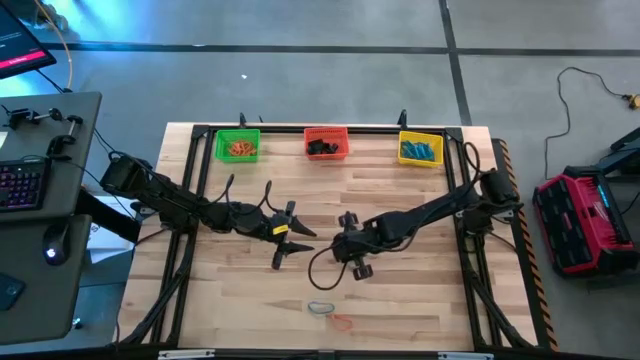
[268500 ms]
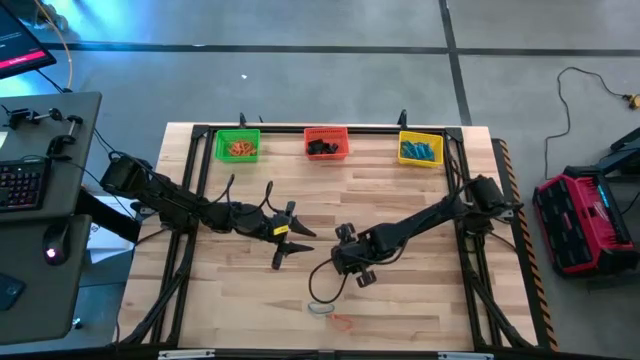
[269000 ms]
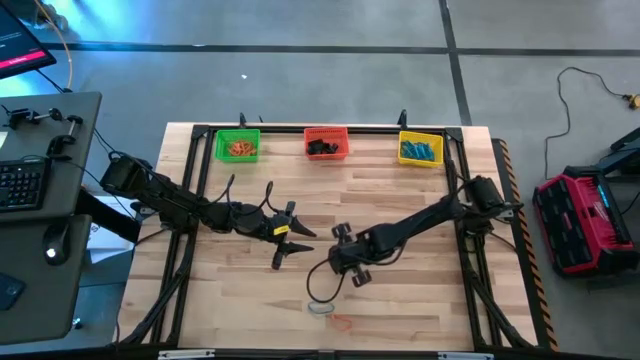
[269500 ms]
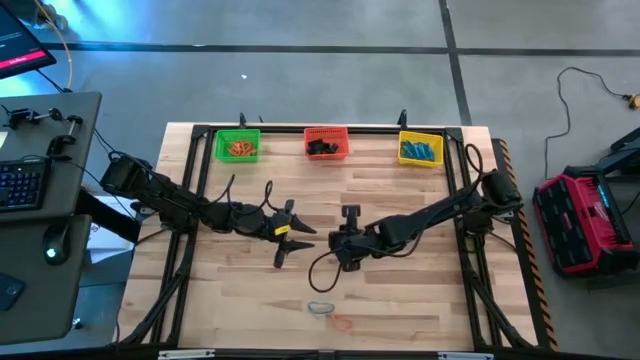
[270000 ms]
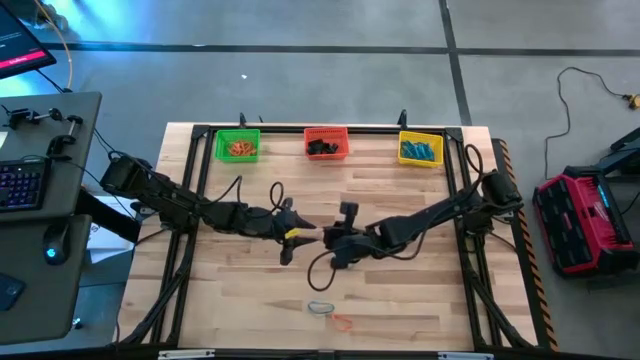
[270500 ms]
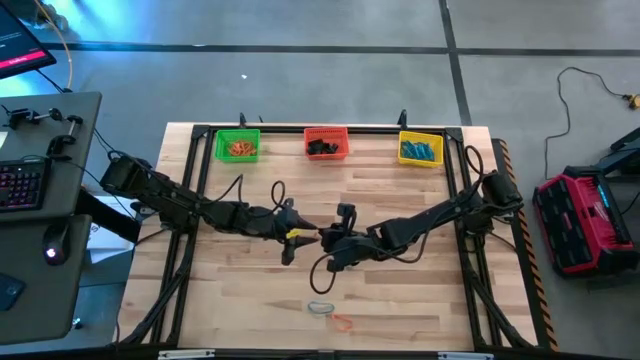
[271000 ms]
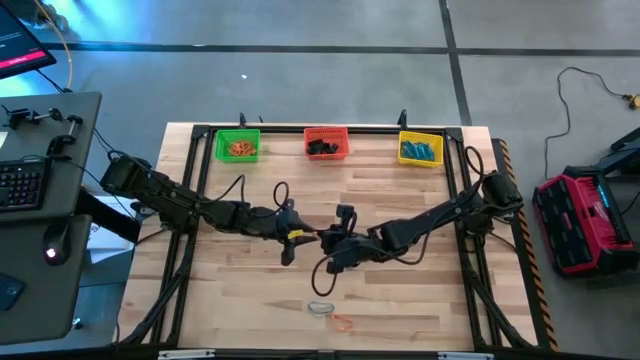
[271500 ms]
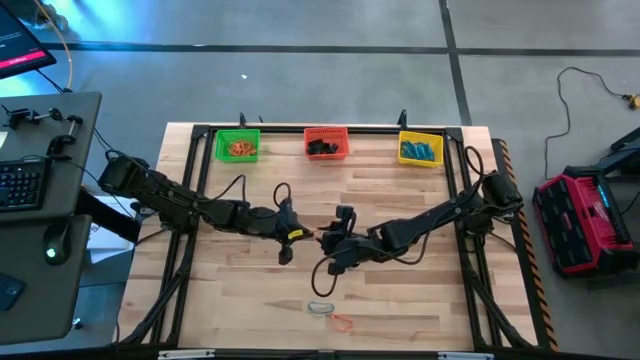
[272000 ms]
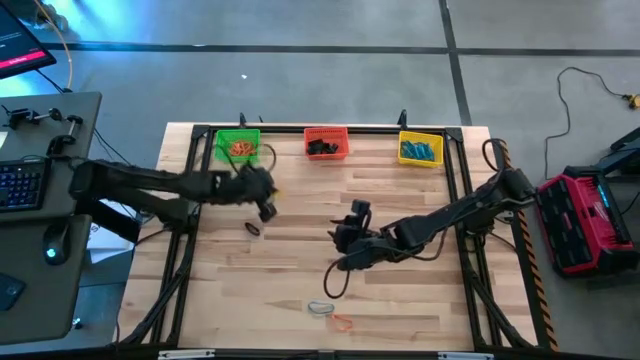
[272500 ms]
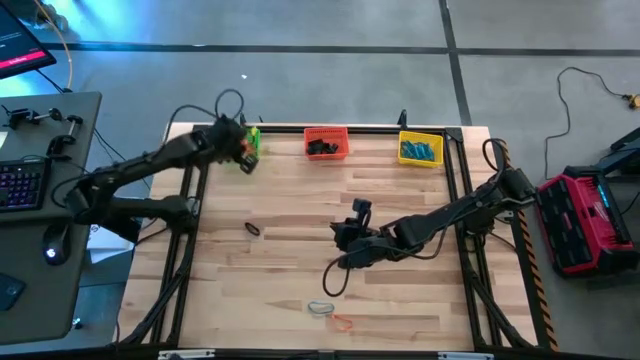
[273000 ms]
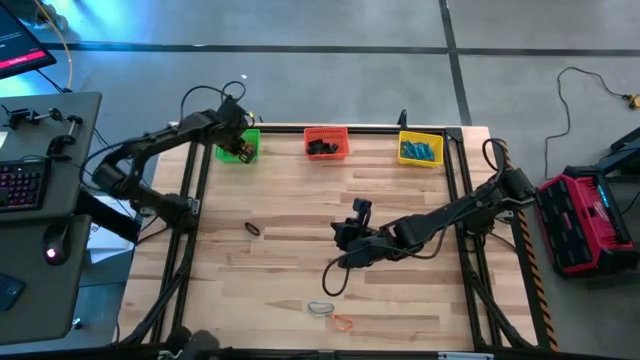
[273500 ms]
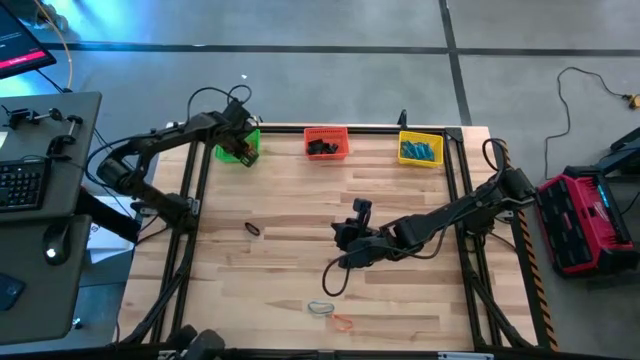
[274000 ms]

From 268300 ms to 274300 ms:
Task: Sort rubber bands into baskets
Put the orange rubber band into the green bin

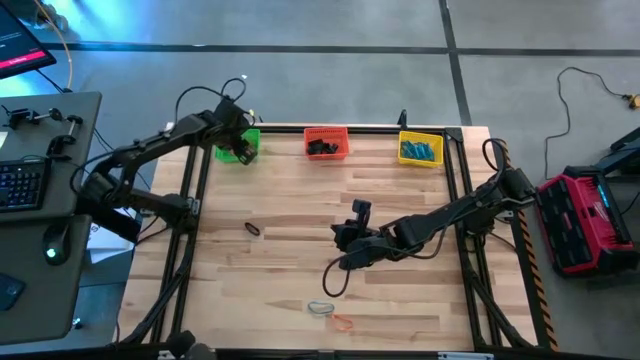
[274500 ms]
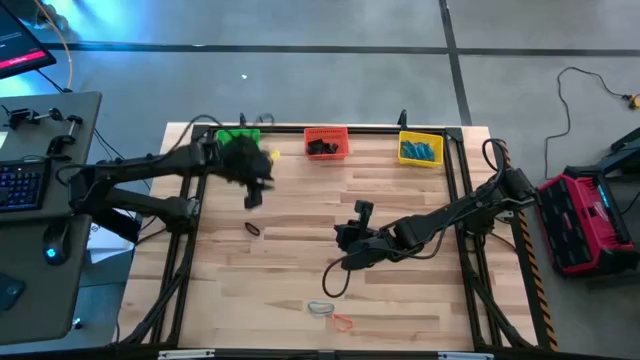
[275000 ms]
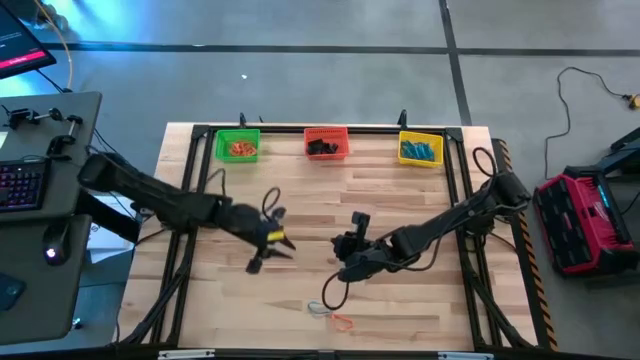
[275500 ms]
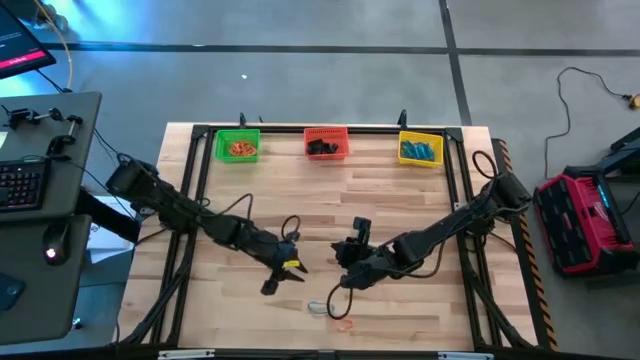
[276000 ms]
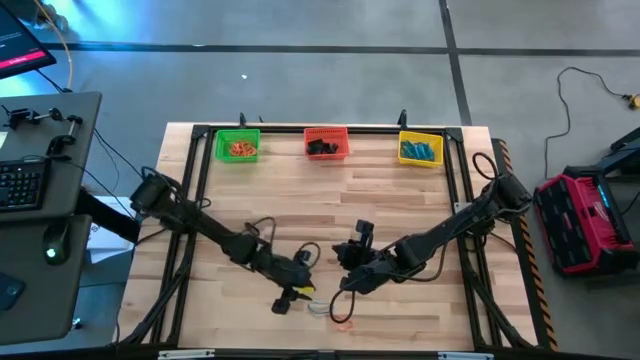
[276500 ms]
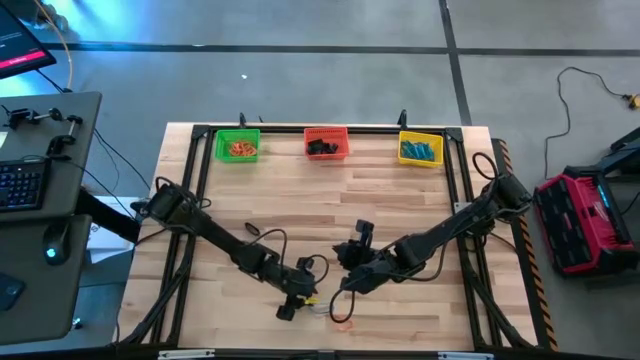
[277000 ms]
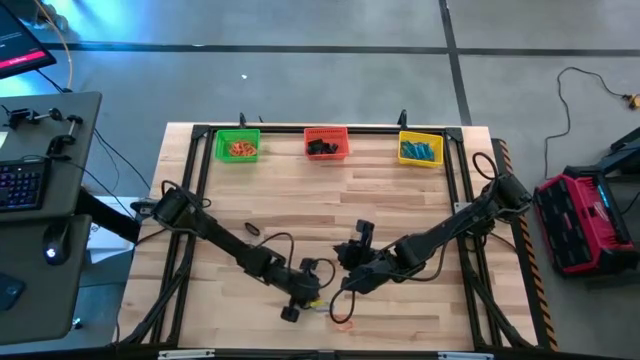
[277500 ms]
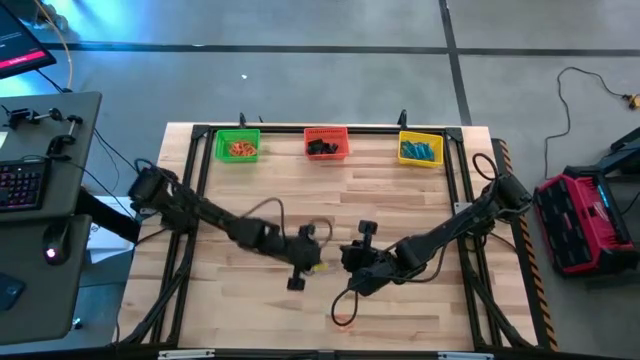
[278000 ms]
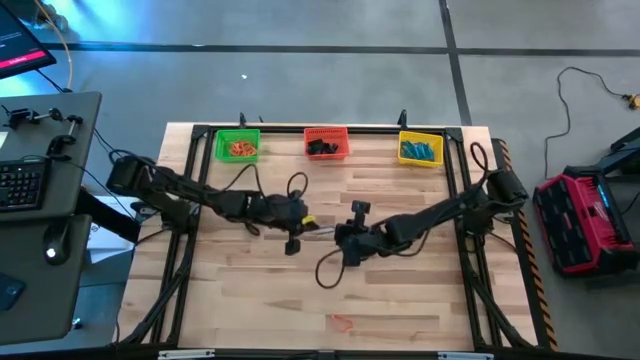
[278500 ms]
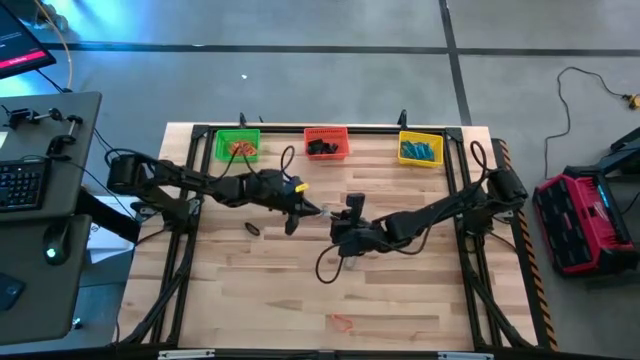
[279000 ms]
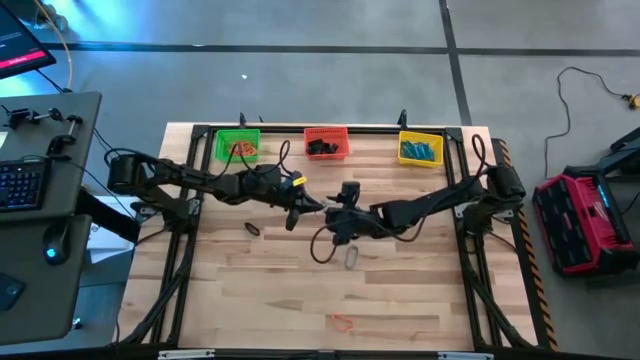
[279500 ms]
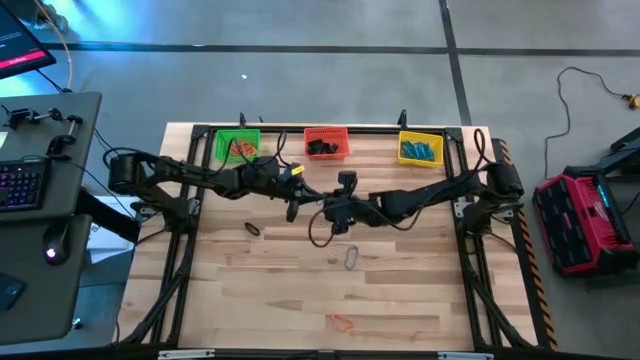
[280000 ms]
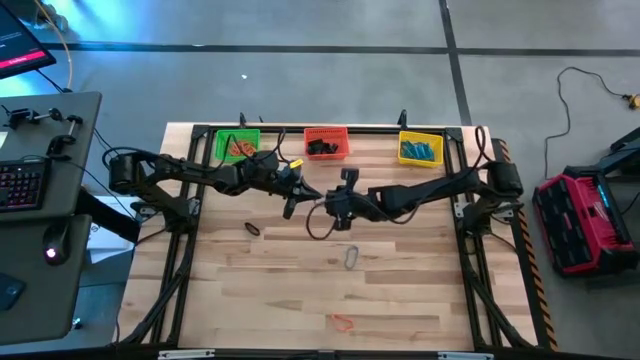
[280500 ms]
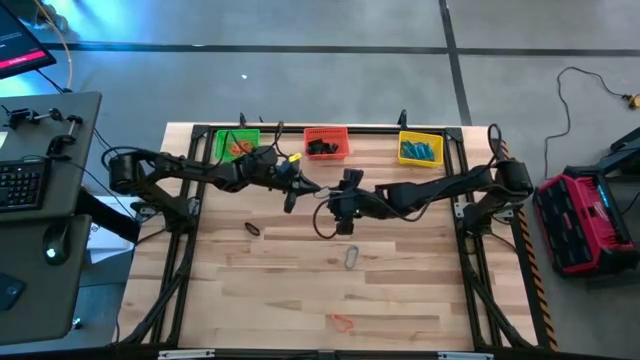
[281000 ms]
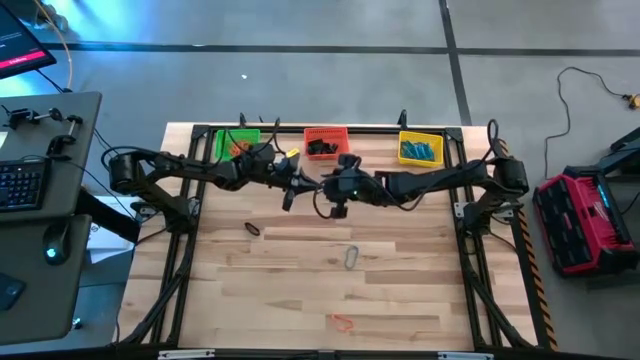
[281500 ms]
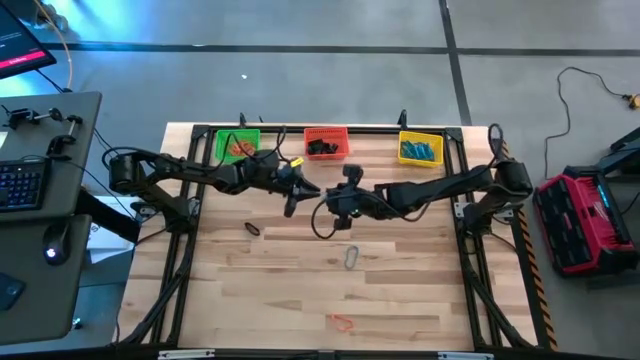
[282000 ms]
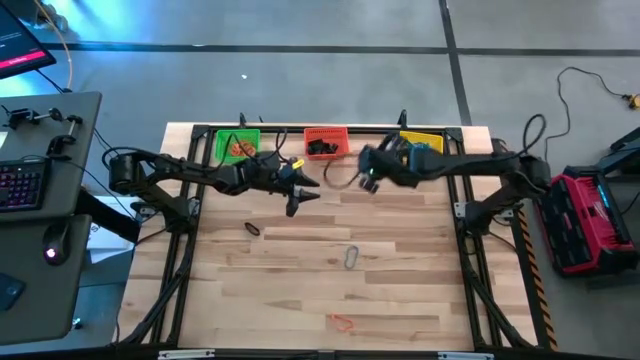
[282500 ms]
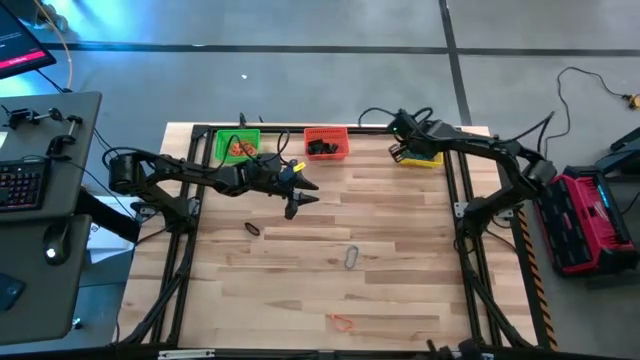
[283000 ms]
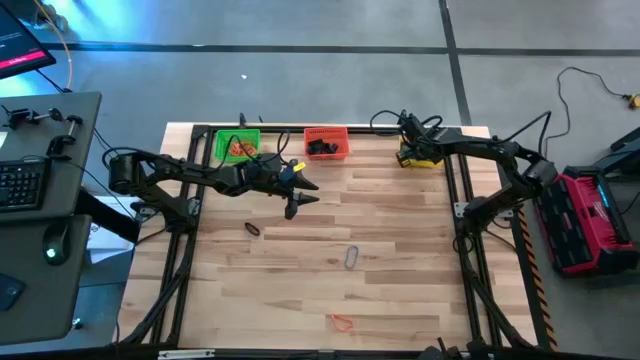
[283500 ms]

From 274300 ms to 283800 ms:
Put the blue rubber band into the yellow bin

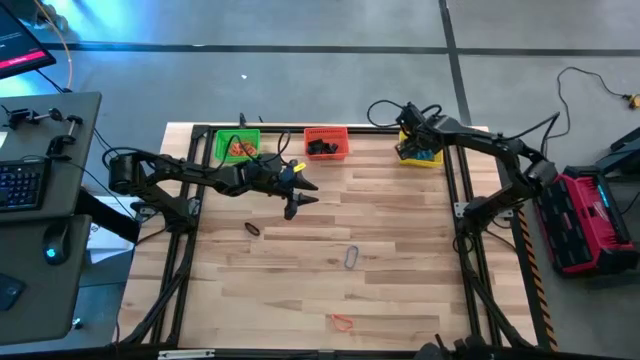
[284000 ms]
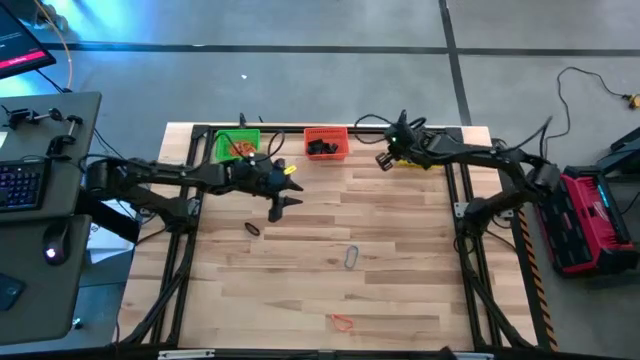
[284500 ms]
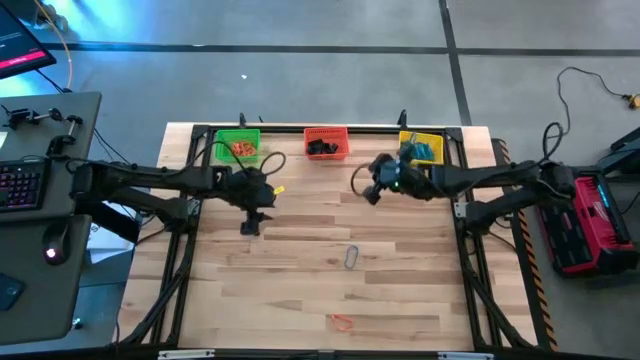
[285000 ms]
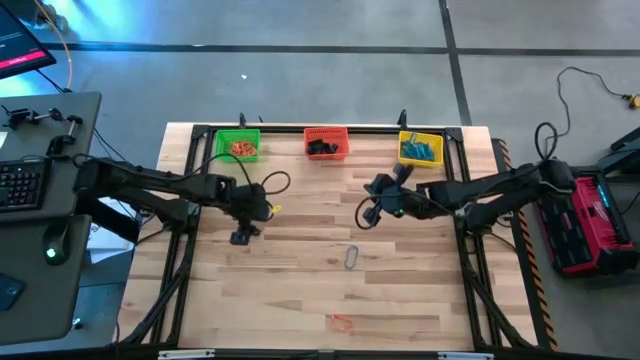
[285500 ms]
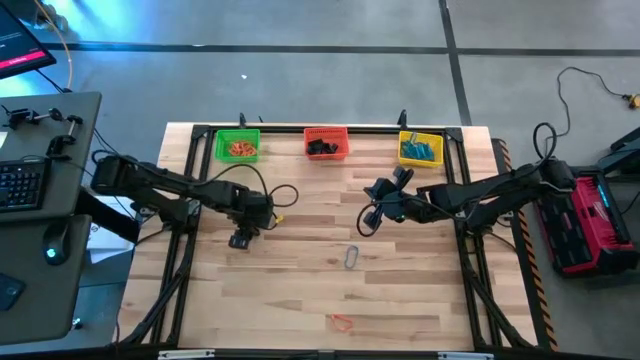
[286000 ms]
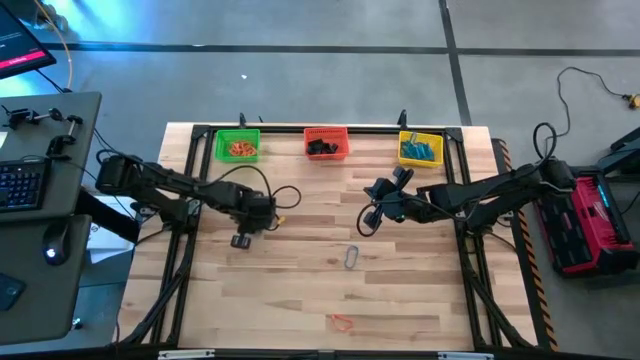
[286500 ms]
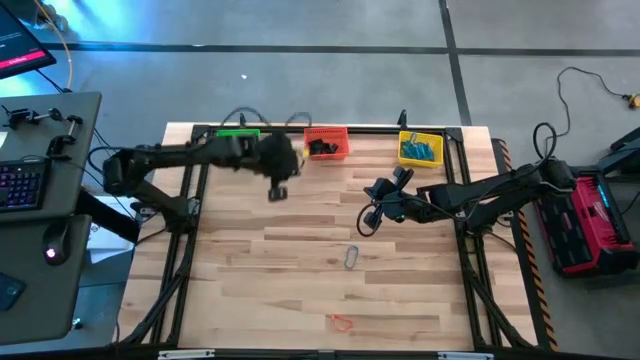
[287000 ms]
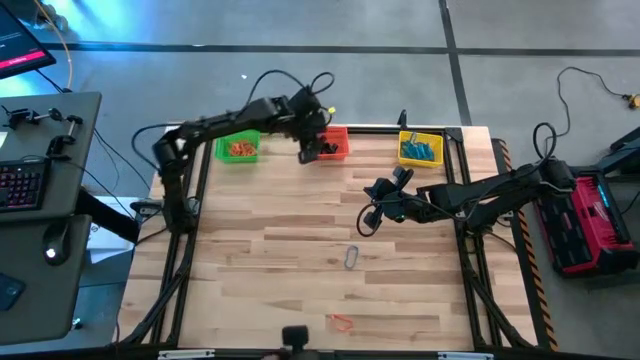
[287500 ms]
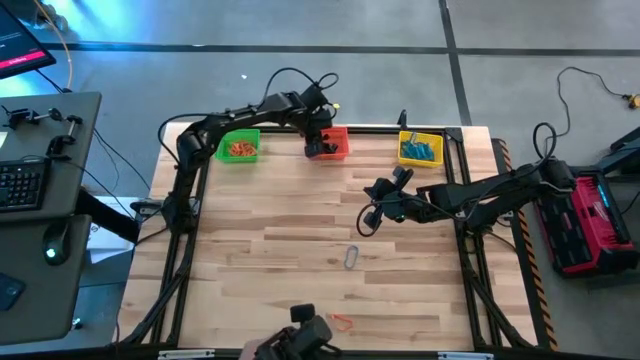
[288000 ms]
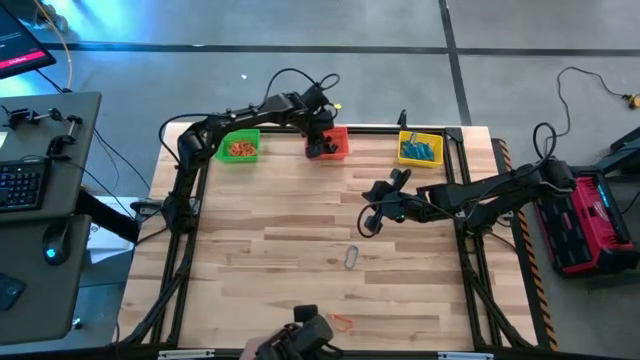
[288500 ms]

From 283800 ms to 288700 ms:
Put the black rubber band into the orange bin

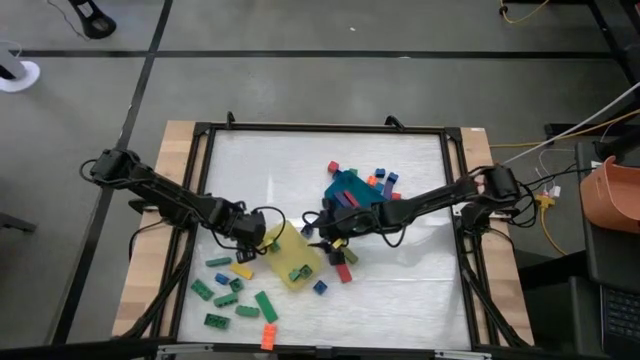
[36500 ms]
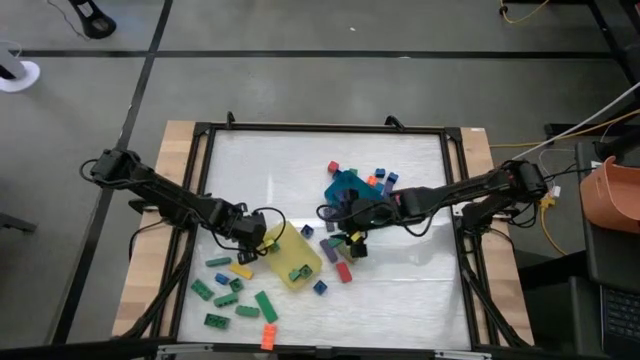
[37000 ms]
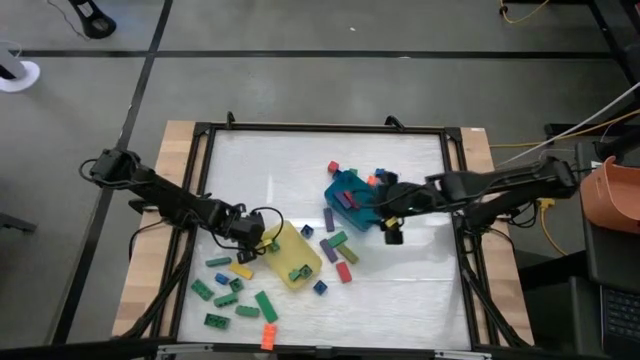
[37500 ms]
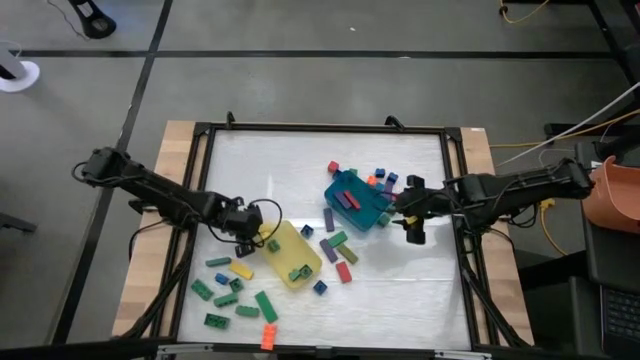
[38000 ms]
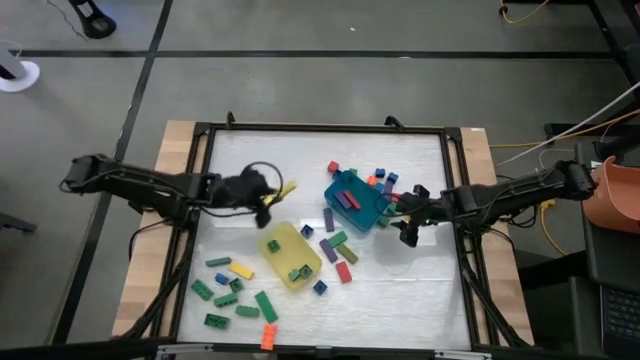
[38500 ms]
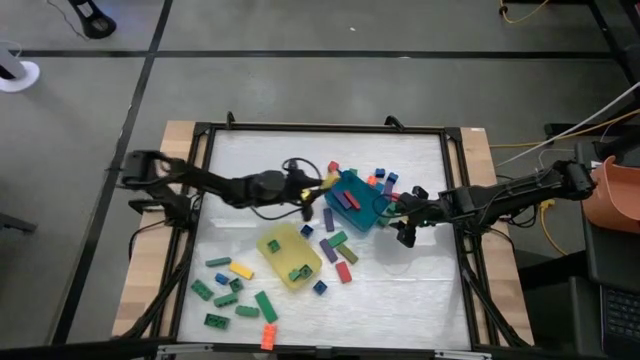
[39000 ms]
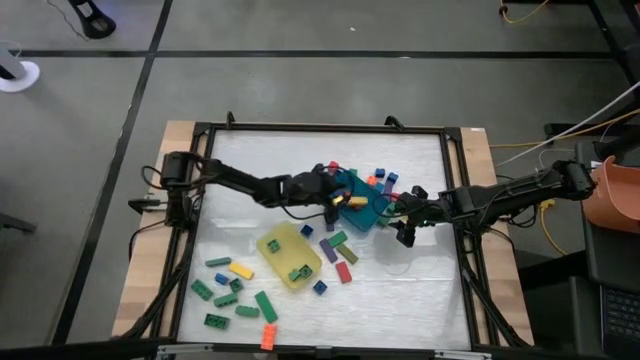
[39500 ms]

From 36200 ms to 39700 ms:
Task: Sort blocks by size
Put the large yellow wooden block into the blue bin
